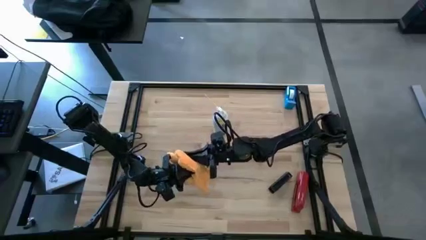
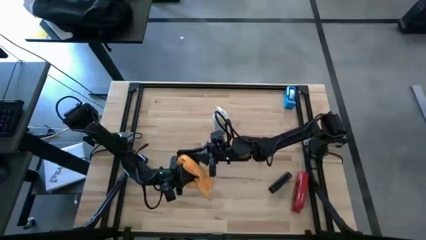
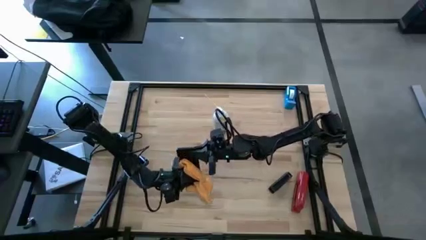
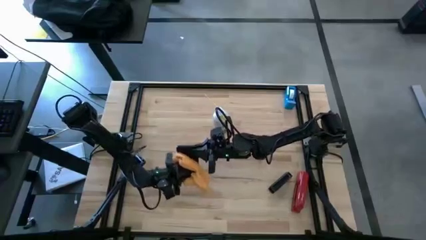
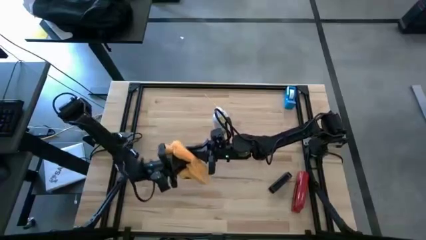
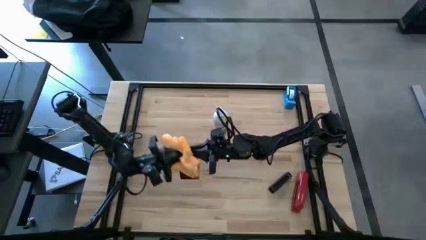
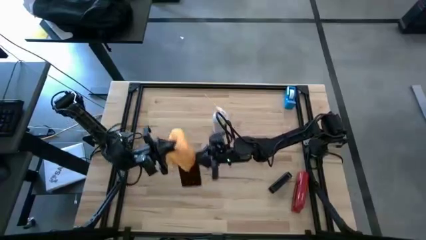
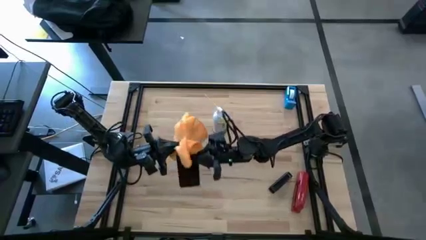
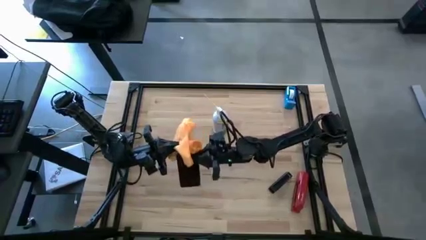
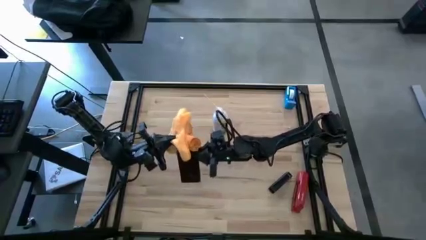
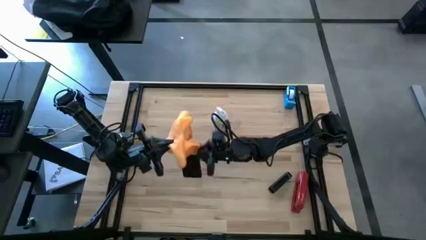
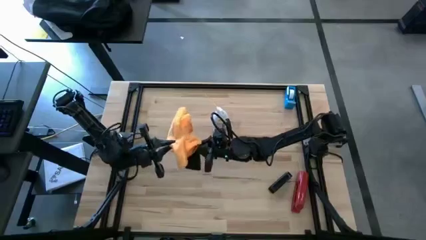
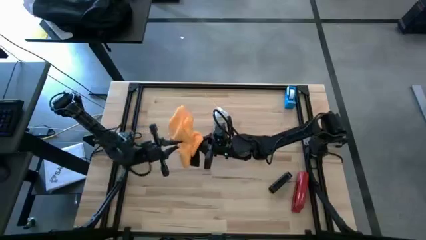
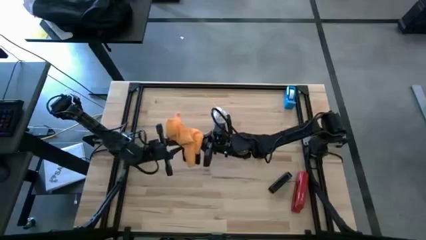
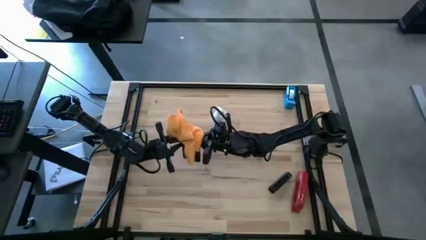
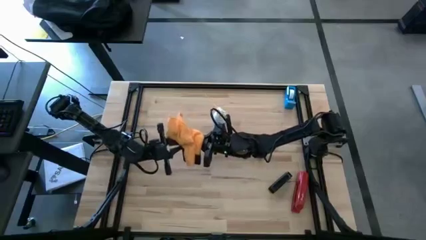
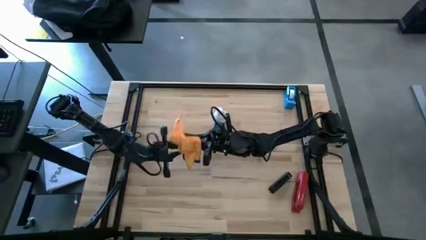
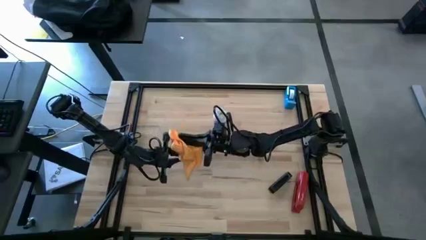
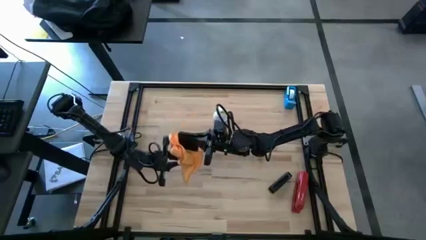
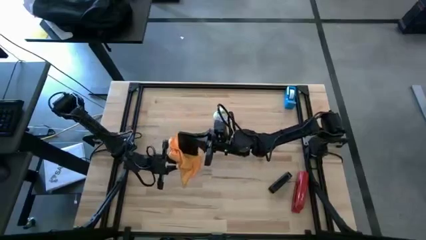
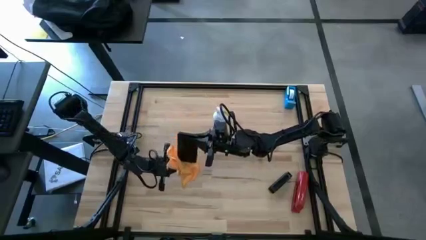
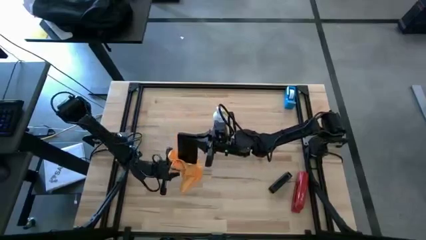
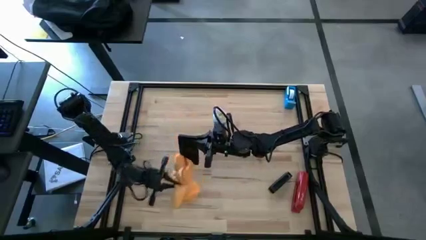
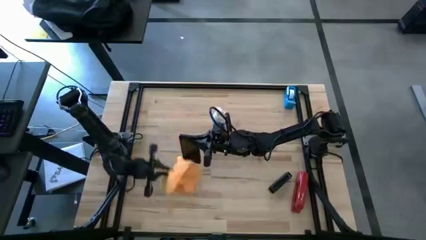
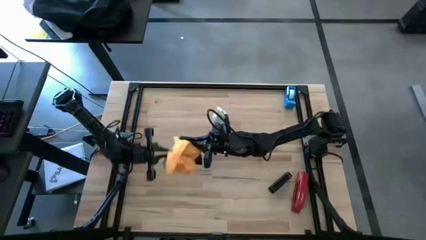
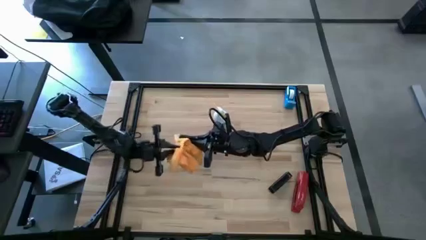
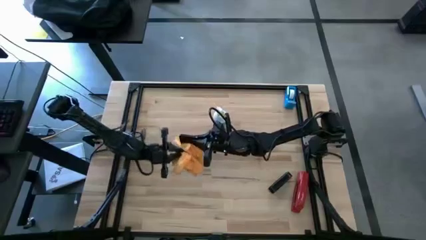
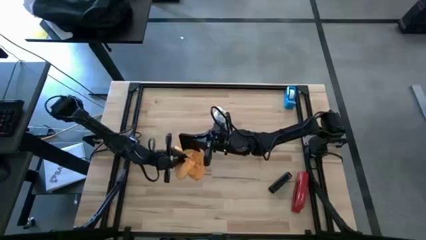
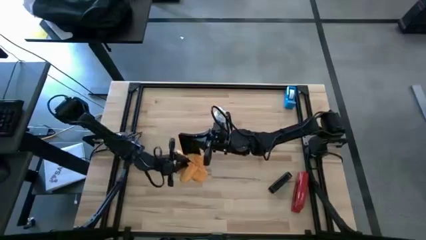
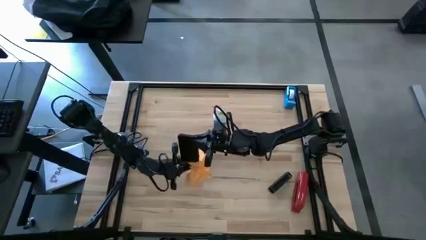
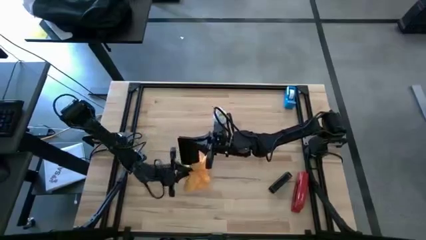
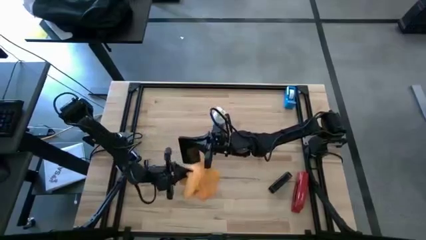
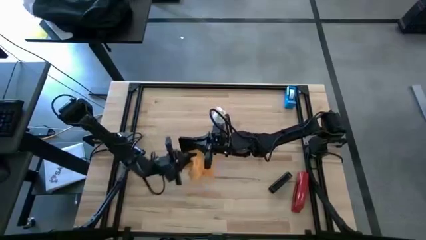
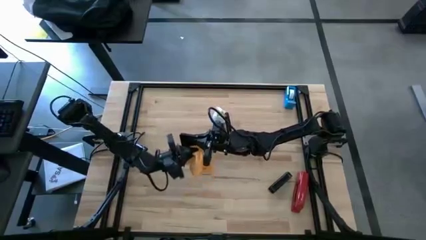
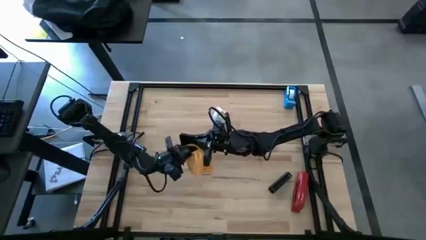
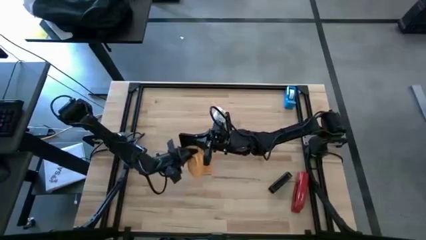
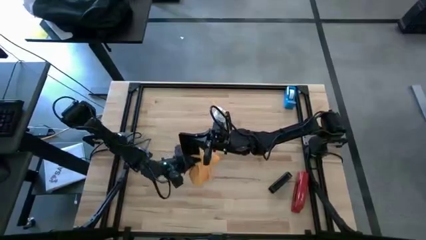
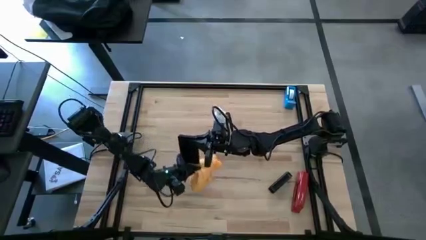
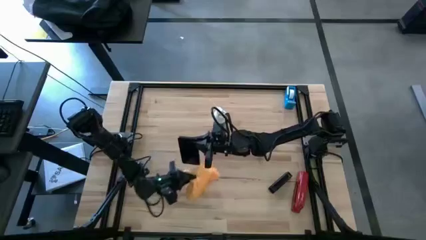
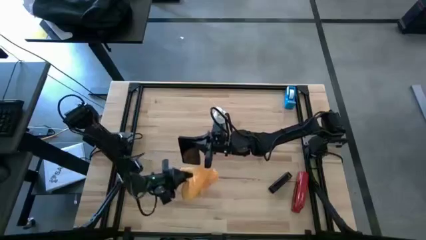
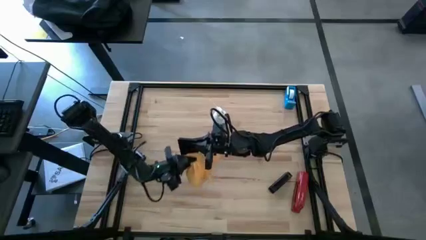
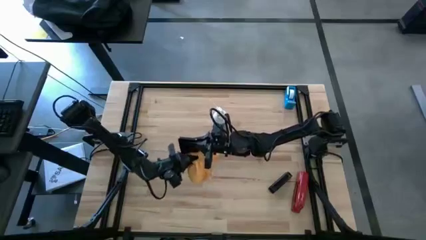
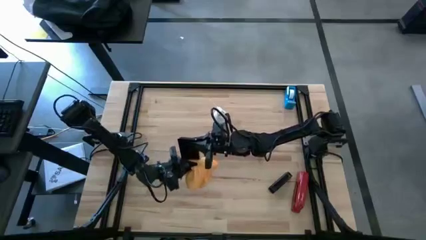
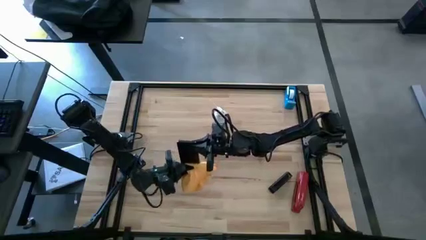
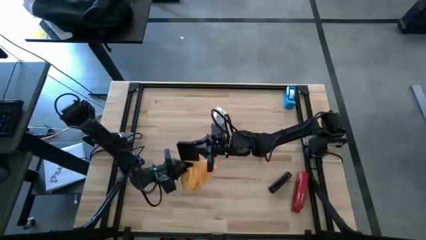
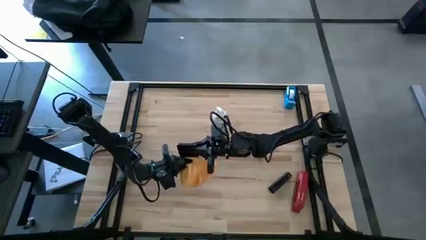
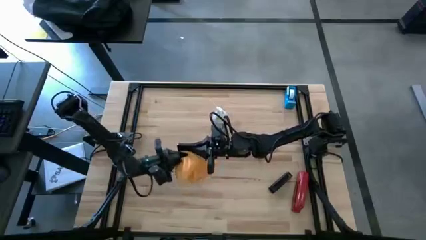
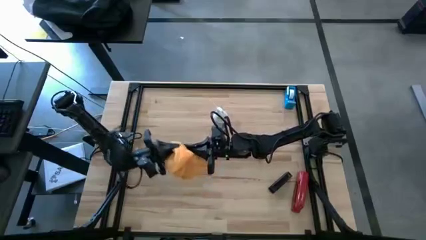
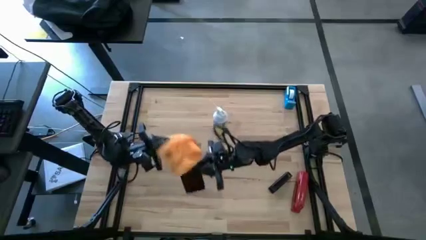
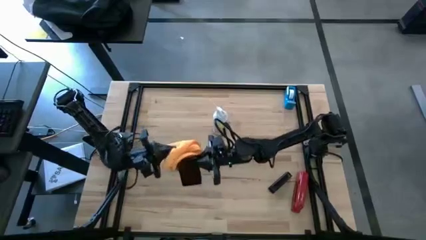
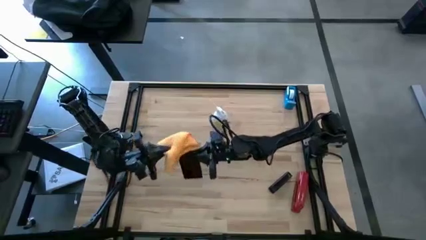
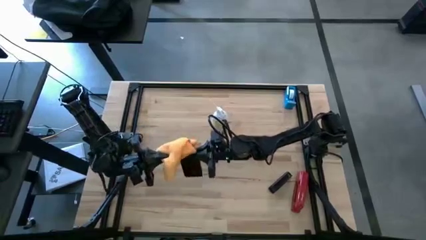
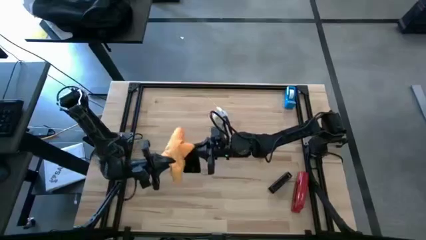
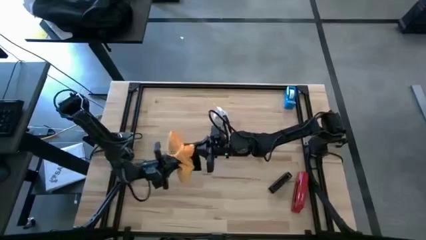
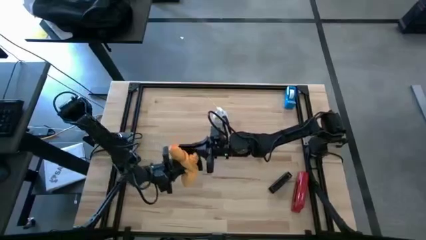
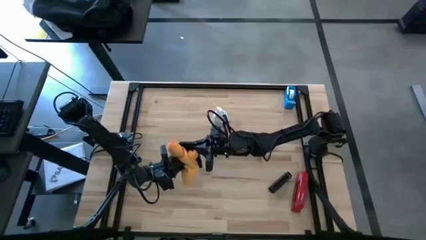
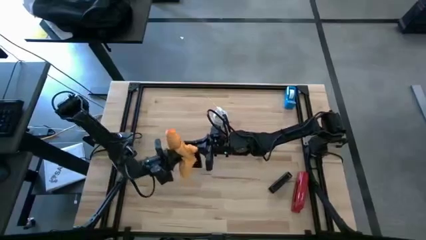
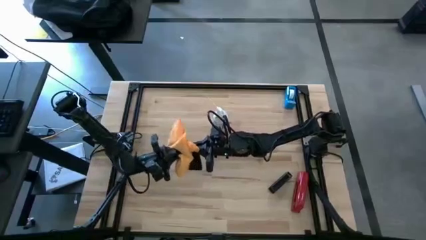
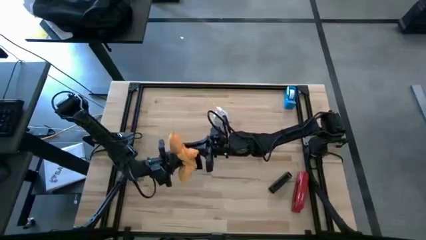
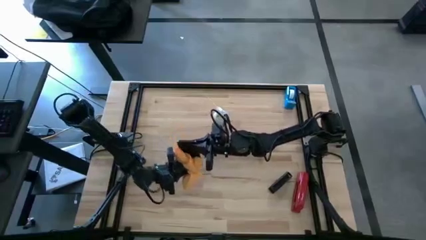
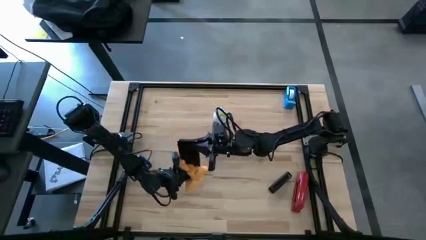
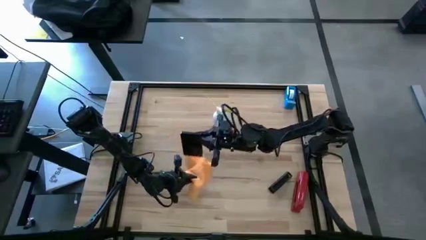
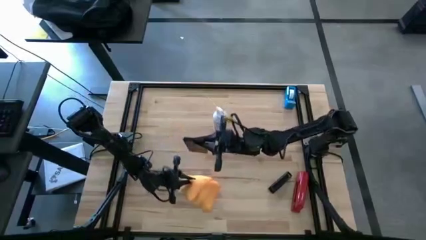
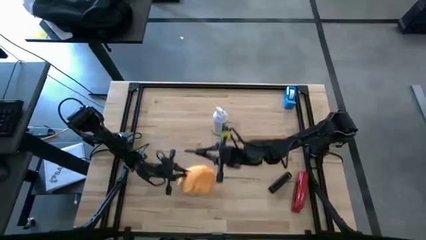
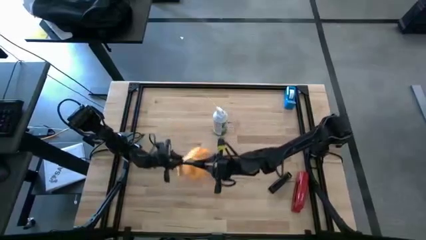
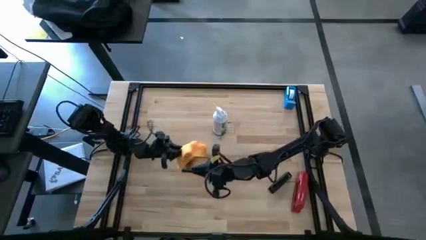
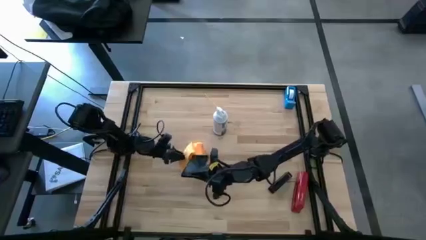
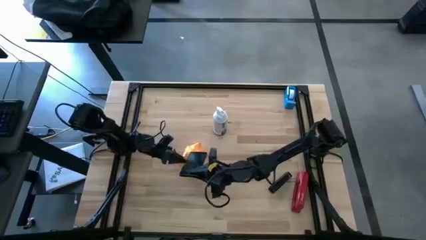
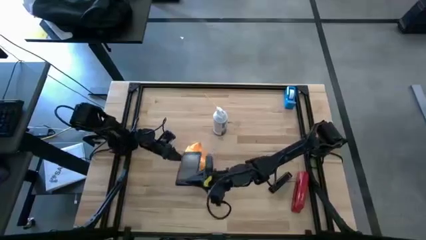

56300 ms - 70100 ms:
Task: Apply microfiber cloth
Wipe the back of the cellphone with the yellow microfiber cloth
